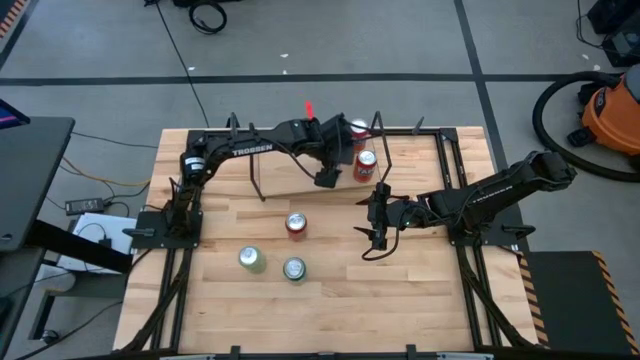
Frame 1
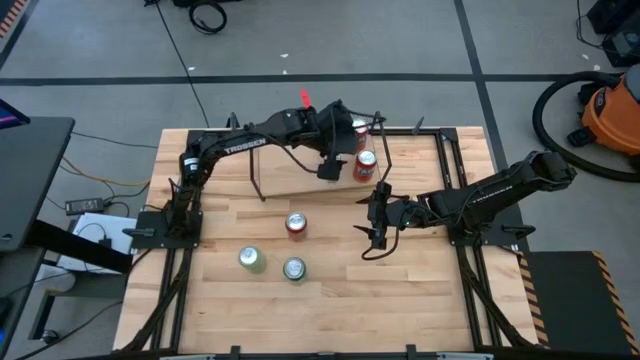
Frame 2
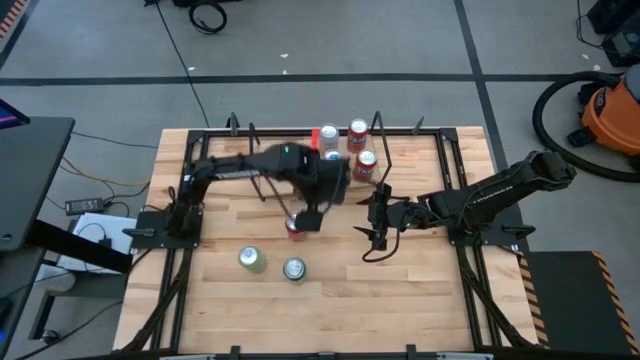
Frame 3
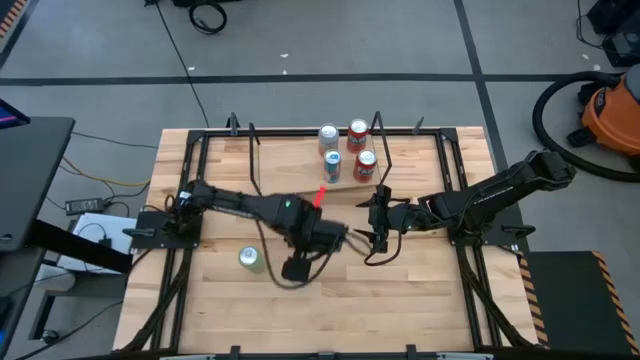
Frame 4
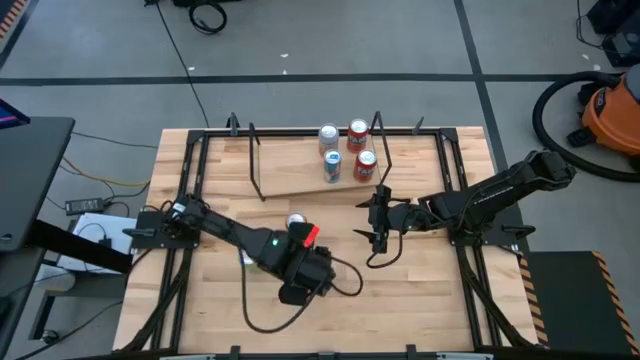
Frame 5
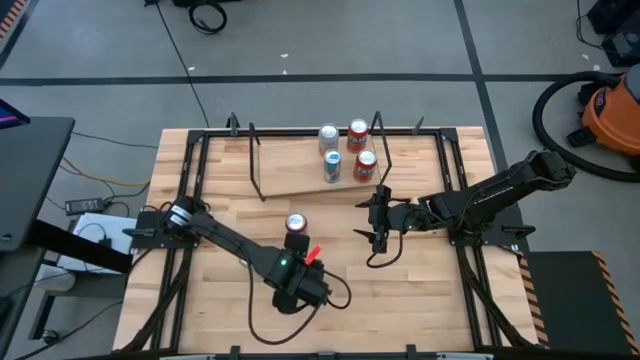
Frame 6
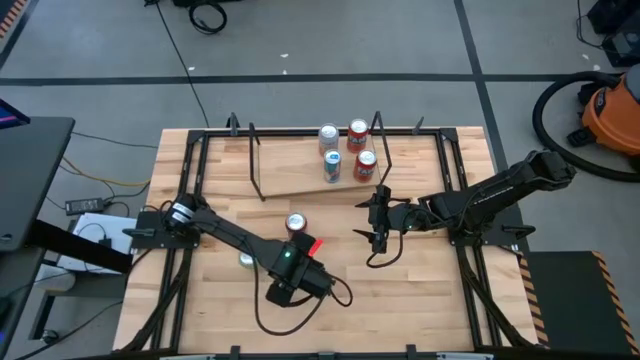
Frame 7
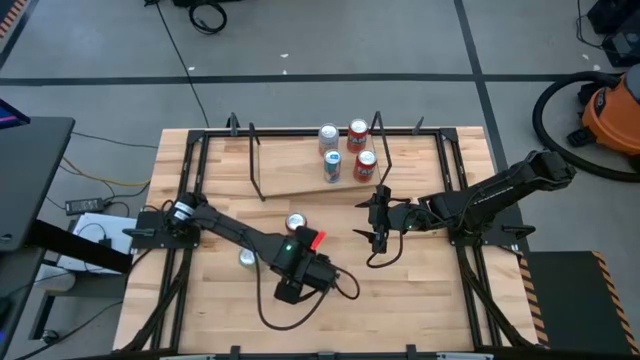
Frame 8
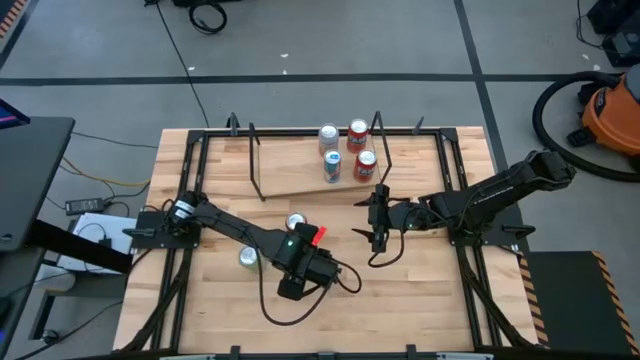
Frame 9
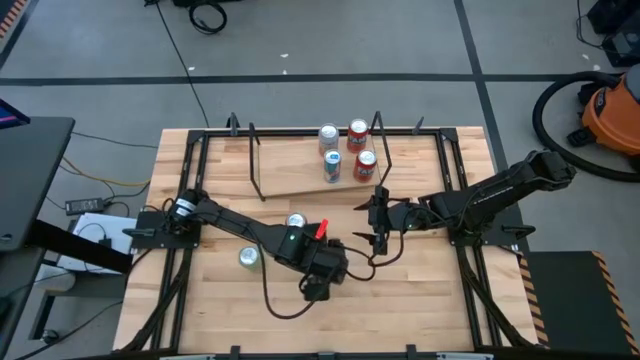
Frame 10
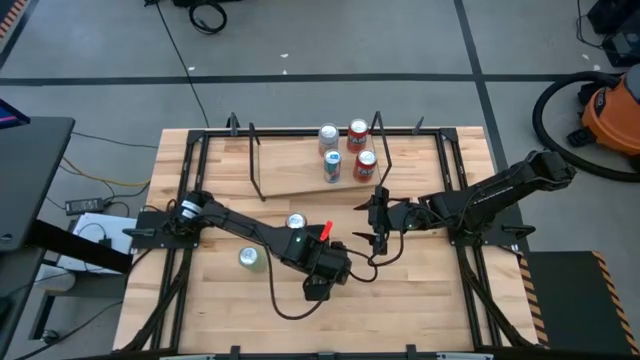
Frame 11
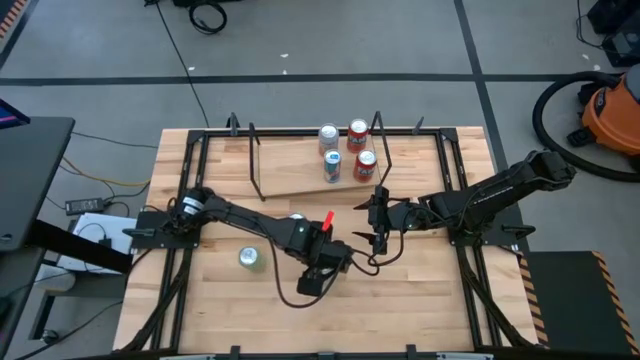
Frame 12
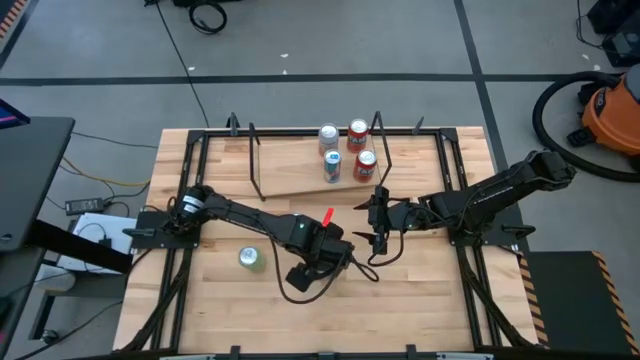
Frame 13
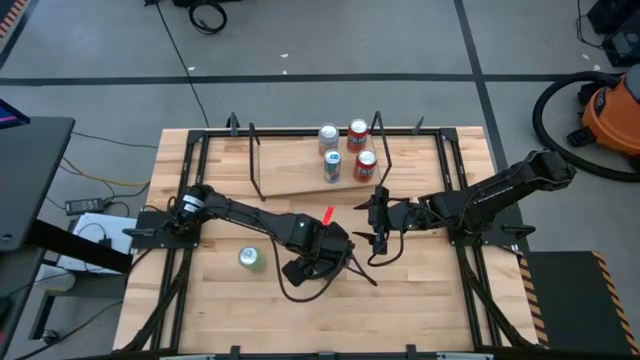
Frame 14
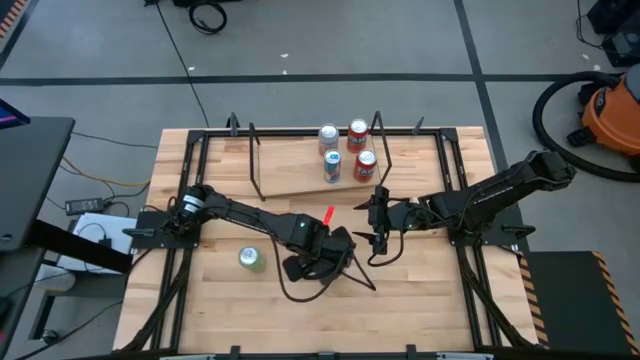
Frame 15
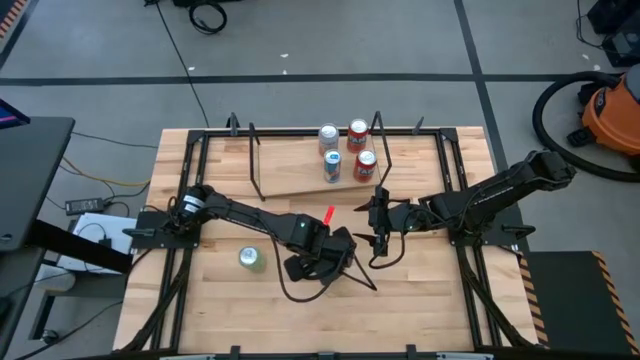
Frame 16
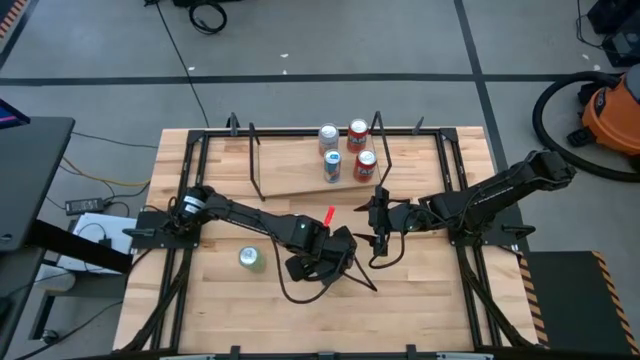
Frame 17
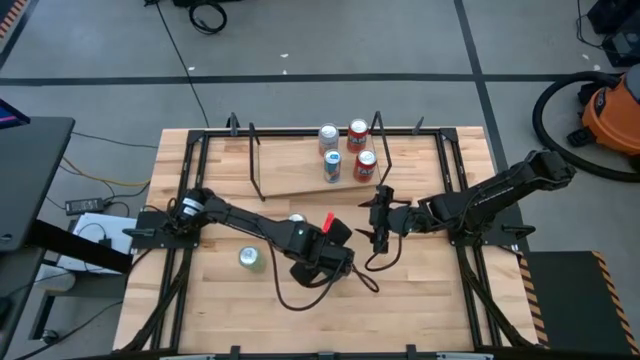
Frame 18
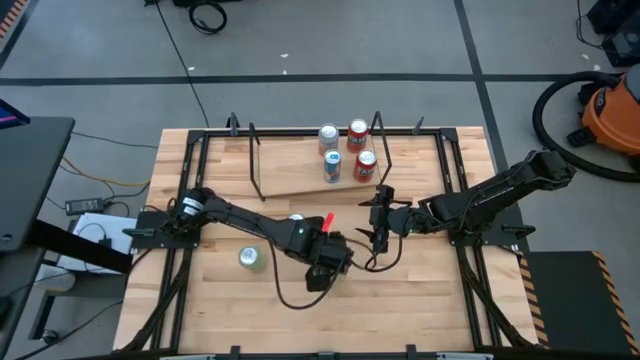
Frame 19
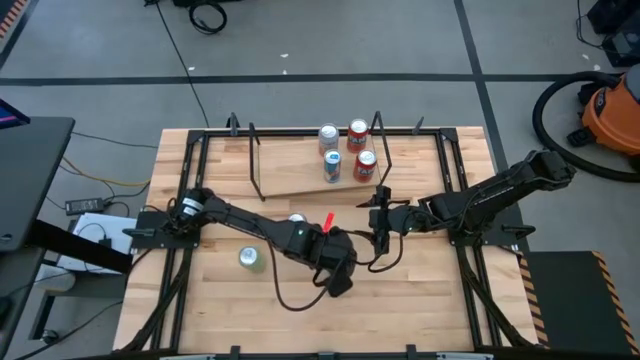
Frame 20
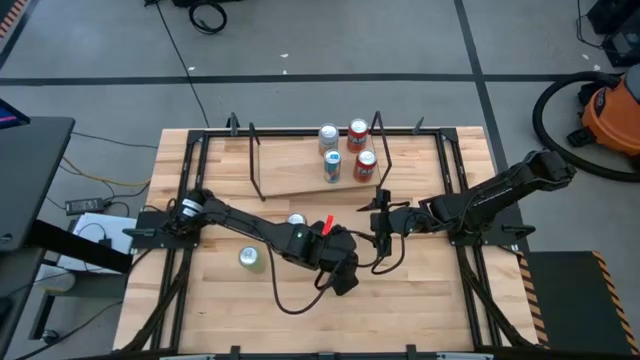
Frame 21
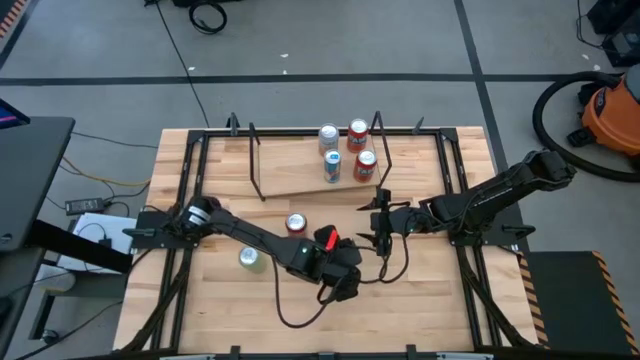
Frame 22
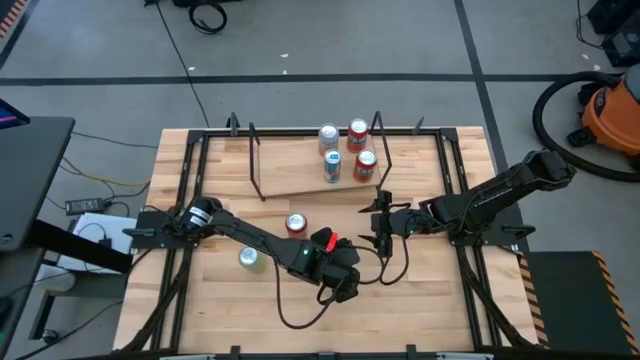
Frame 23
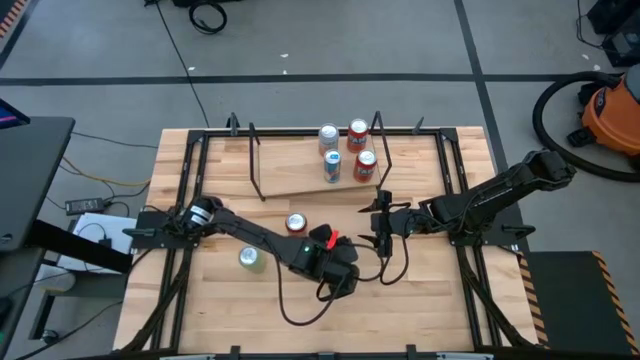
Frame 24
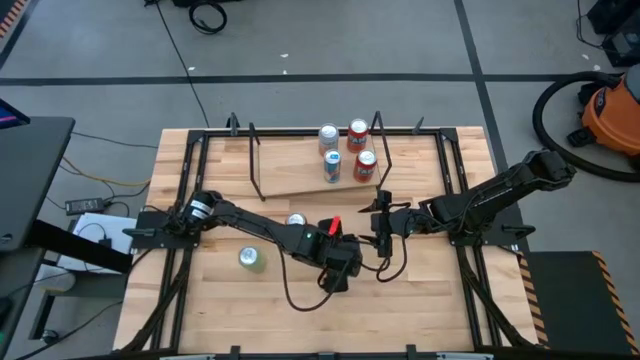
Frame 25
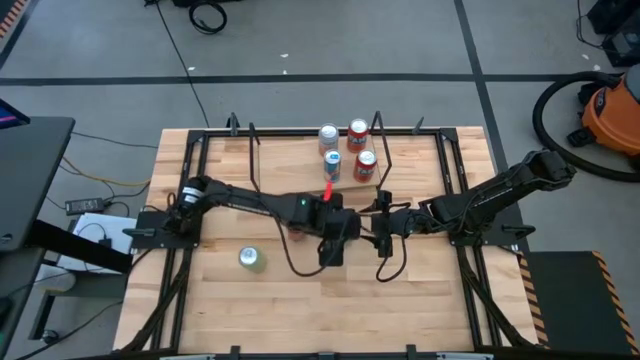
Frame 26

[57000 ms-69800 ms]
Task: Place canned beverage on shelf
Put the green soda can on the shelf

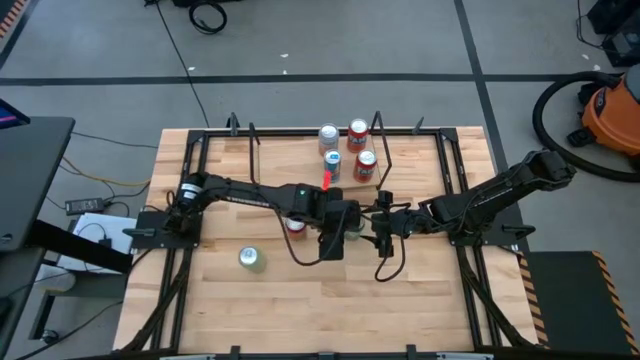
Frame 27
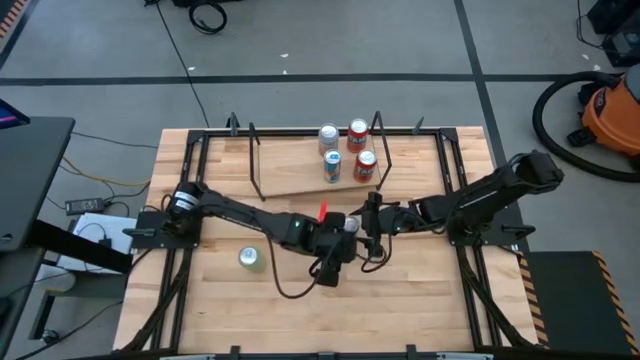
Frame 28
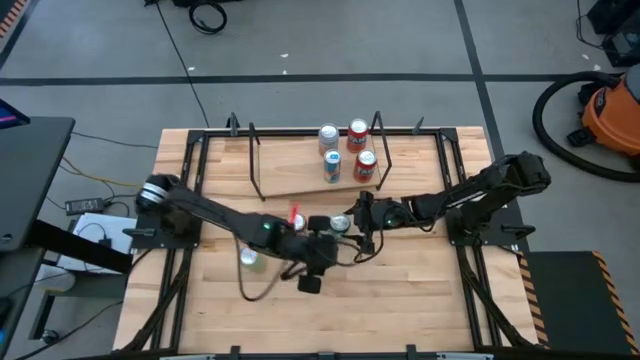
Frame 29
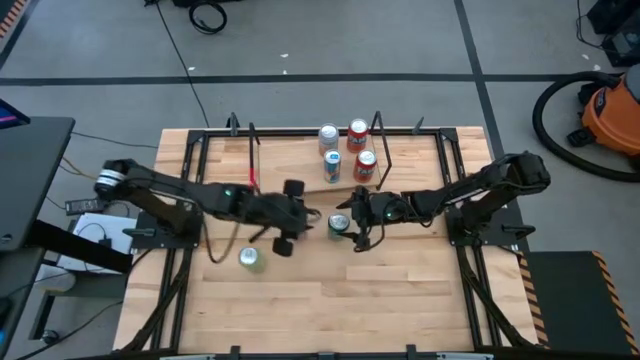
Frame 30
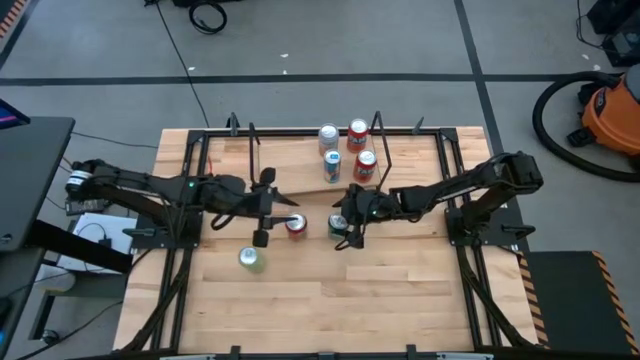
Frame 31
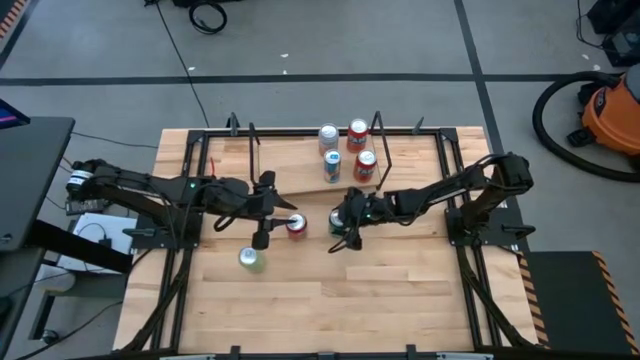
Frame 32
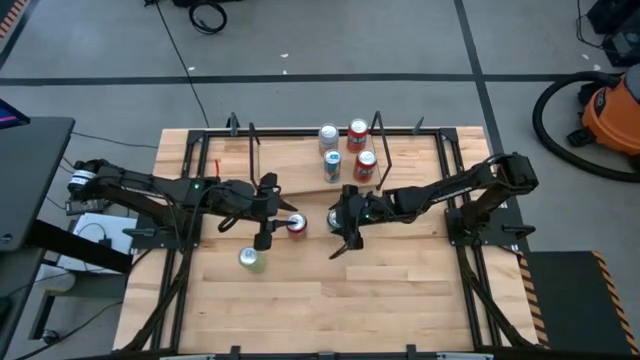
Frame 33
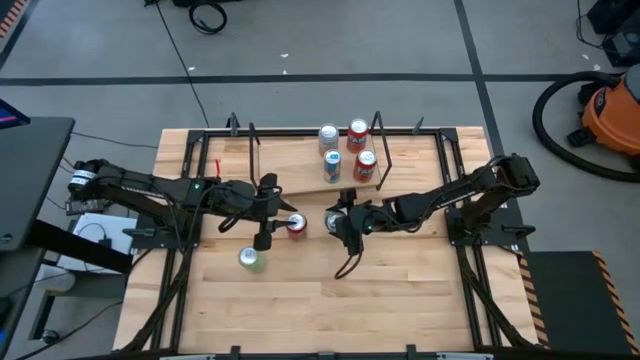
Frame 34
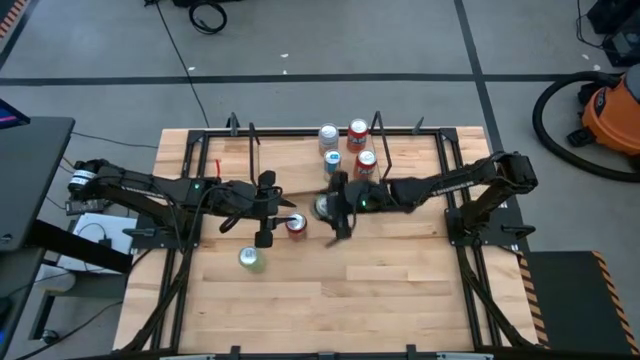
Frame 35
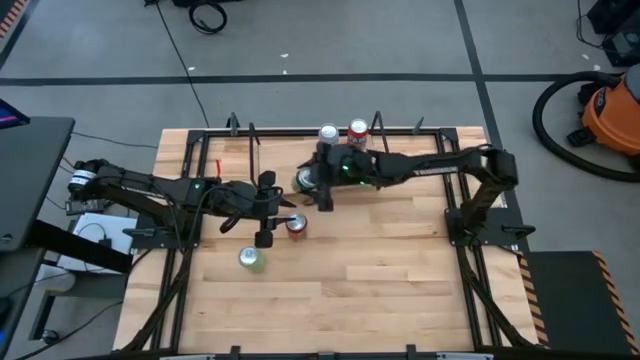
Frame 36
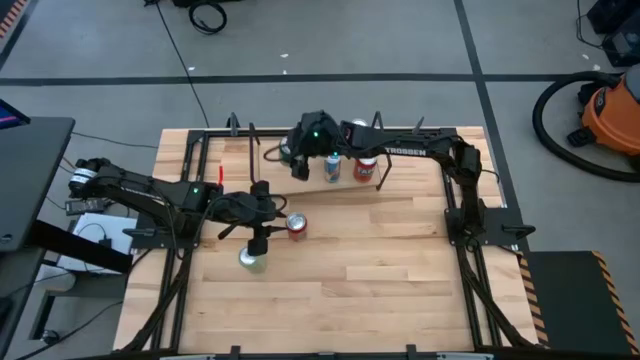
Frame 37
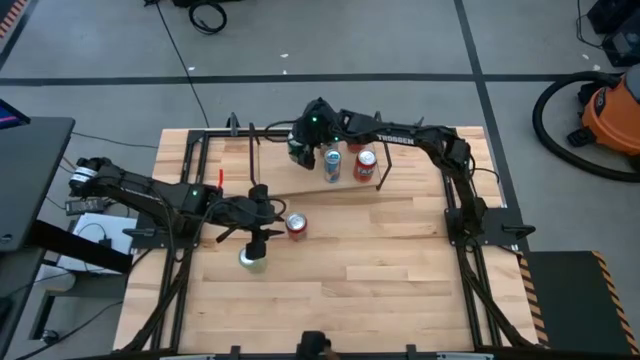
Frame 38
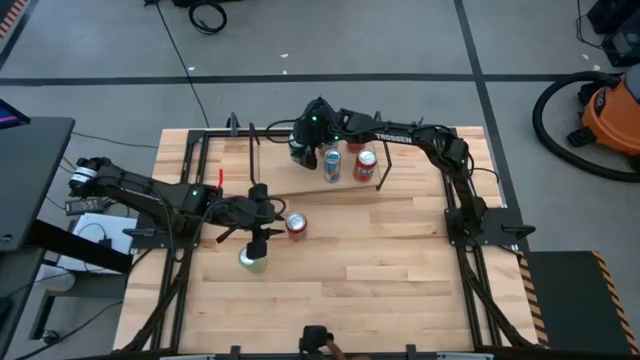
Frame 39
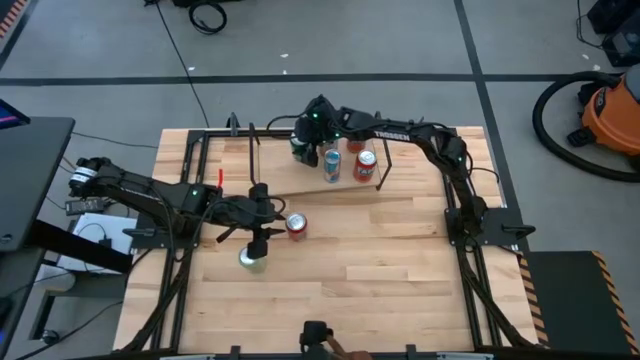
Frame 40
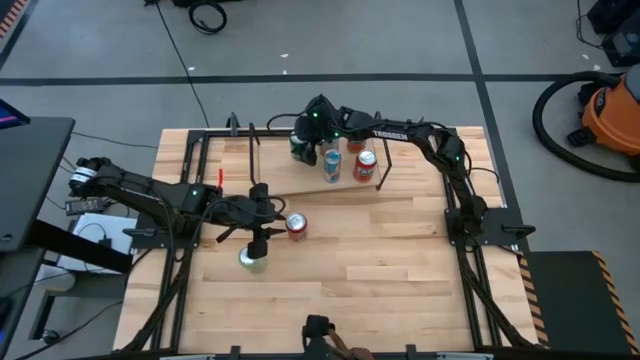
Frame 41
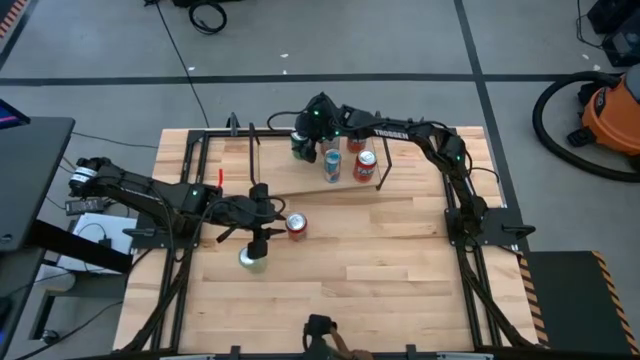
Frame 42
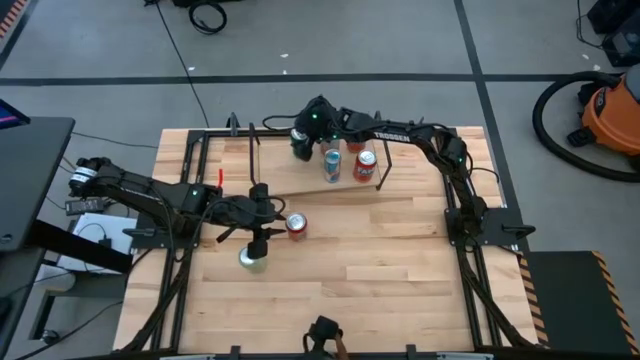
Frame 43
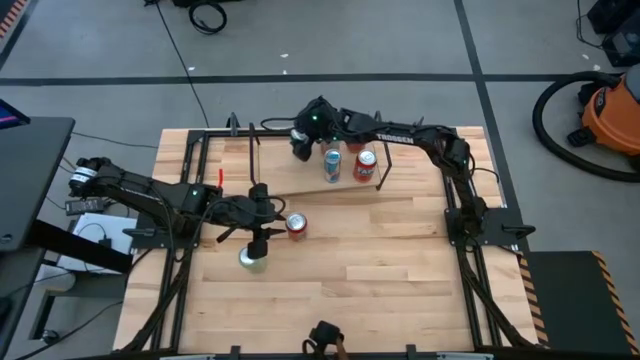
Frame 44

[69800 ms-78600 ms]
Put the green soda can on the shelf
